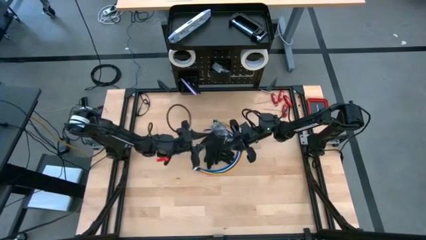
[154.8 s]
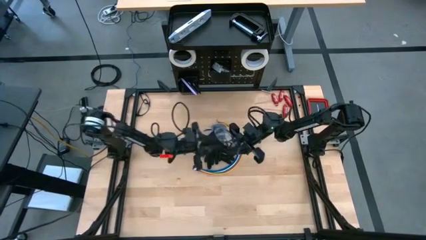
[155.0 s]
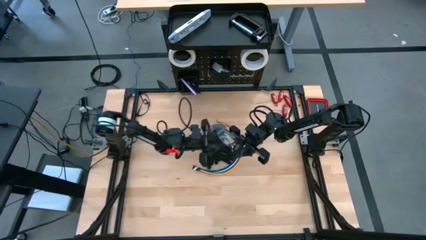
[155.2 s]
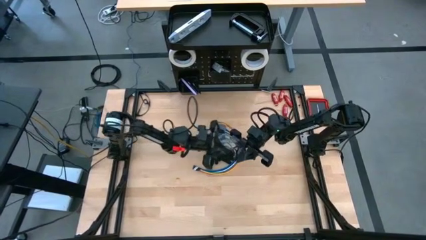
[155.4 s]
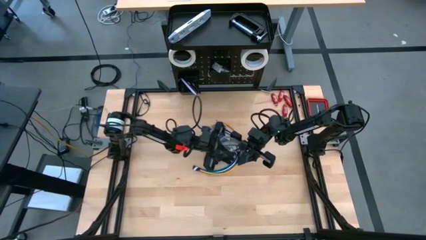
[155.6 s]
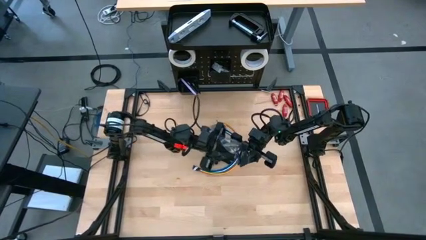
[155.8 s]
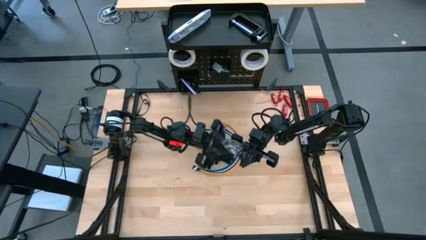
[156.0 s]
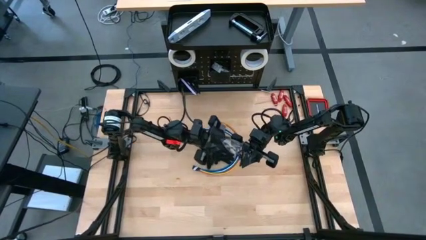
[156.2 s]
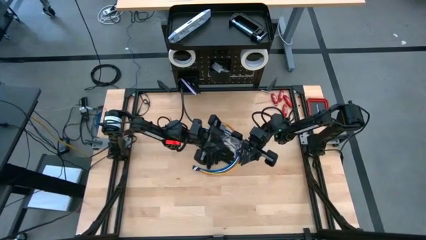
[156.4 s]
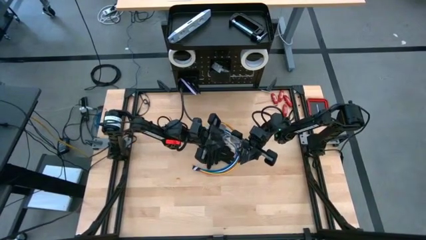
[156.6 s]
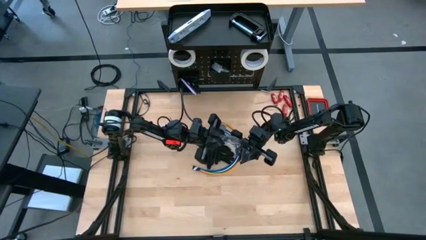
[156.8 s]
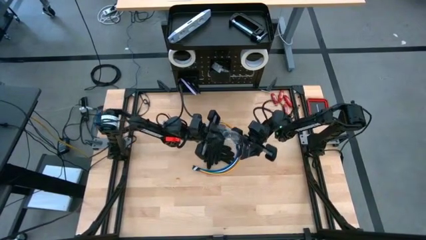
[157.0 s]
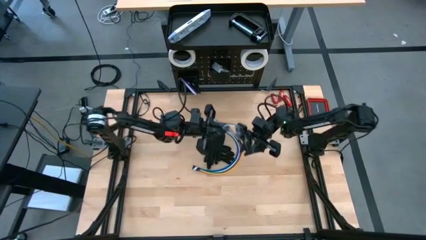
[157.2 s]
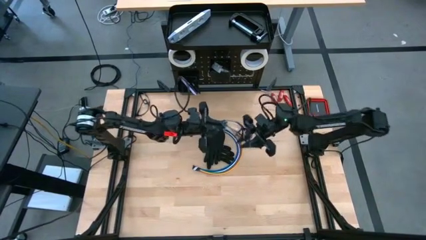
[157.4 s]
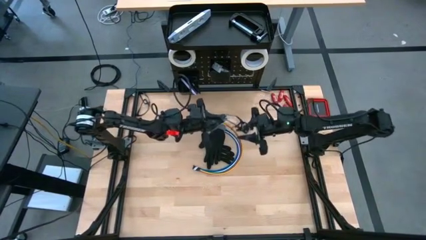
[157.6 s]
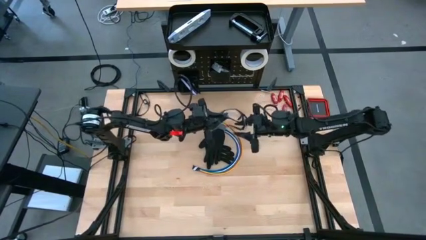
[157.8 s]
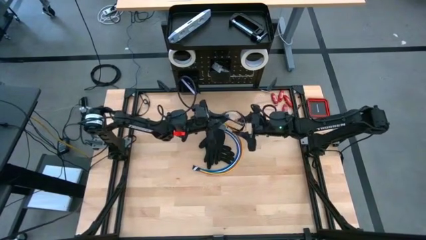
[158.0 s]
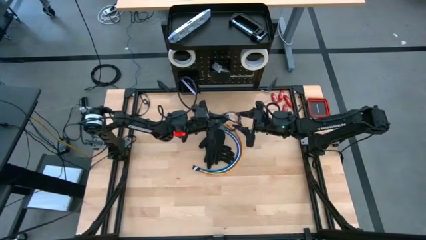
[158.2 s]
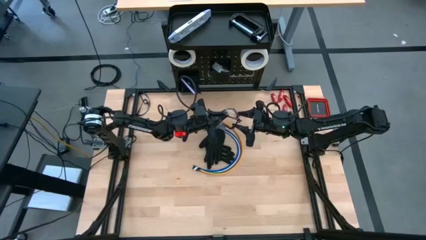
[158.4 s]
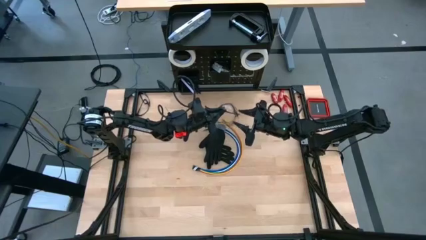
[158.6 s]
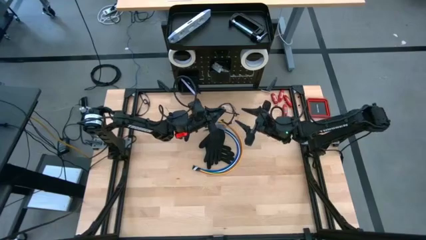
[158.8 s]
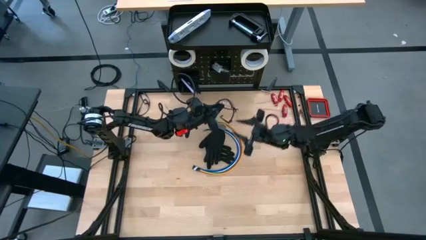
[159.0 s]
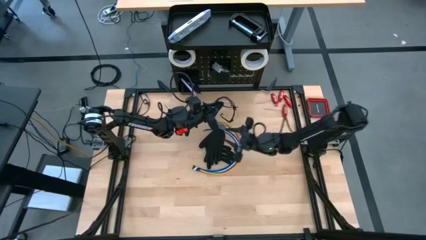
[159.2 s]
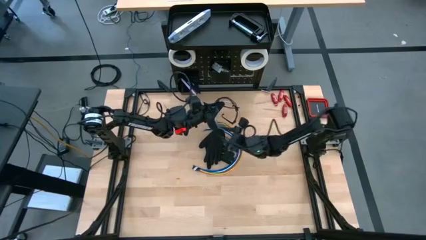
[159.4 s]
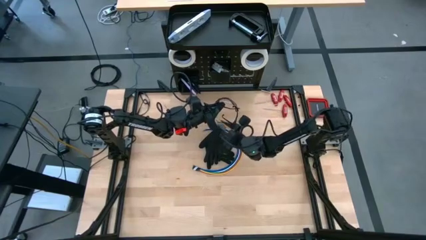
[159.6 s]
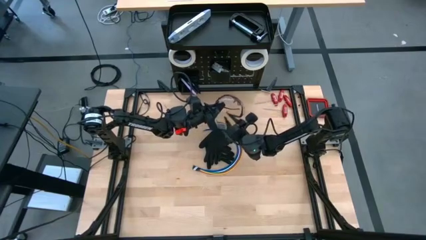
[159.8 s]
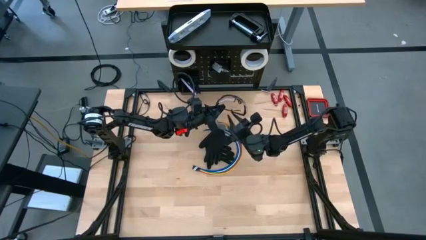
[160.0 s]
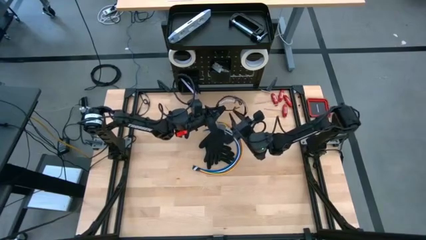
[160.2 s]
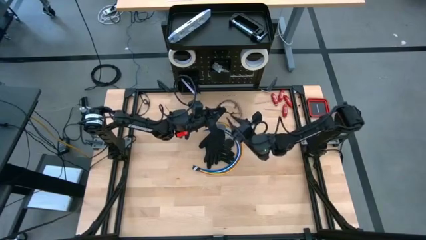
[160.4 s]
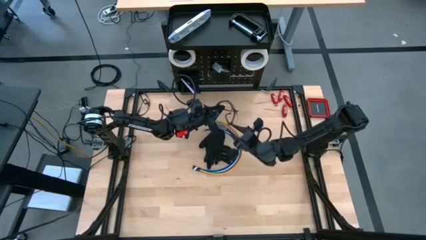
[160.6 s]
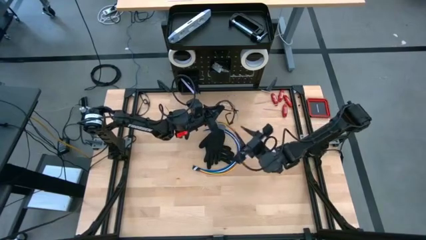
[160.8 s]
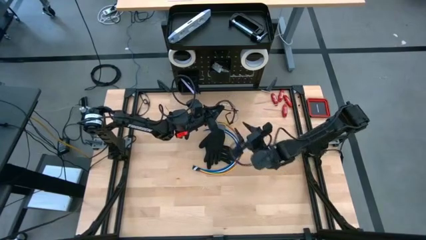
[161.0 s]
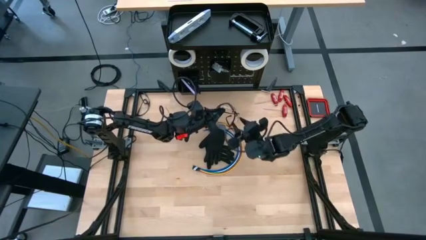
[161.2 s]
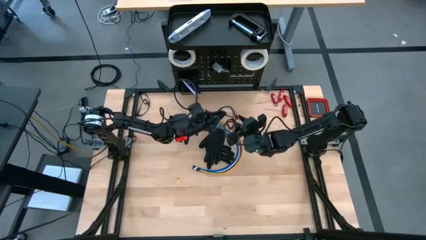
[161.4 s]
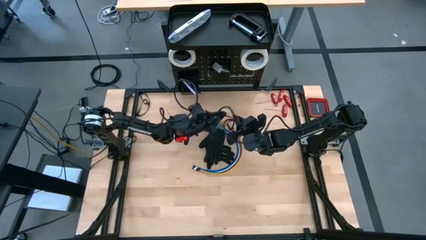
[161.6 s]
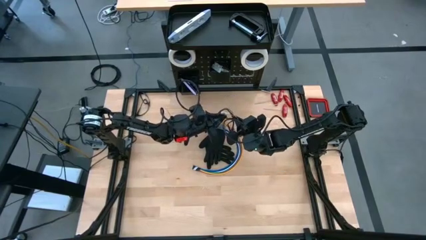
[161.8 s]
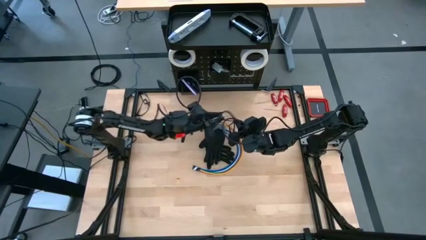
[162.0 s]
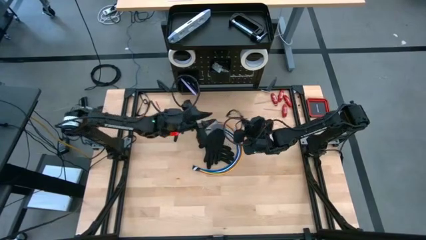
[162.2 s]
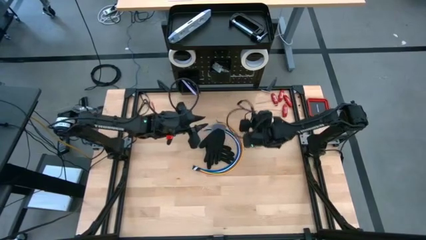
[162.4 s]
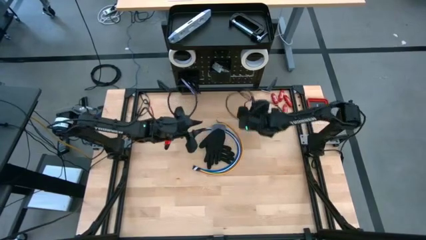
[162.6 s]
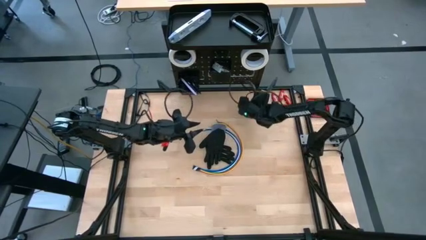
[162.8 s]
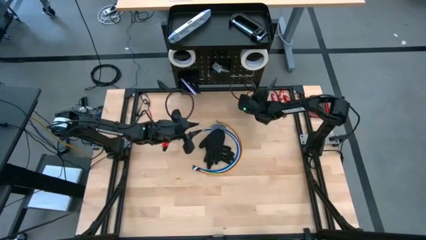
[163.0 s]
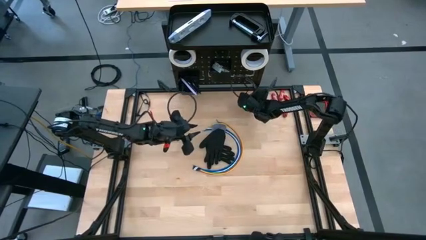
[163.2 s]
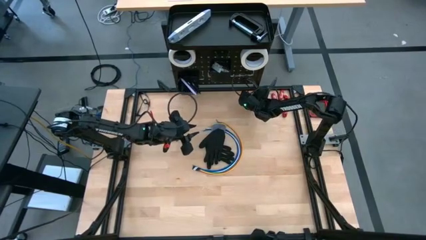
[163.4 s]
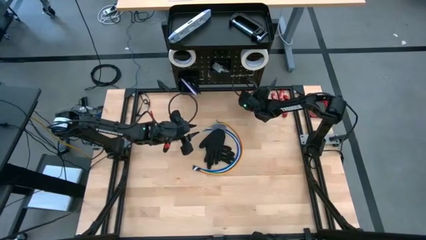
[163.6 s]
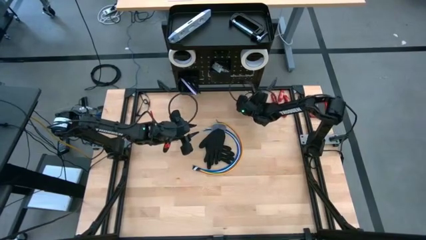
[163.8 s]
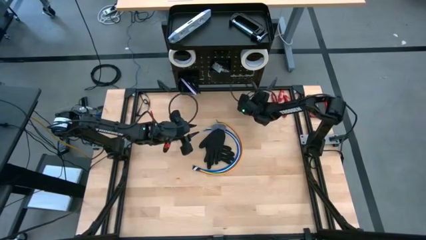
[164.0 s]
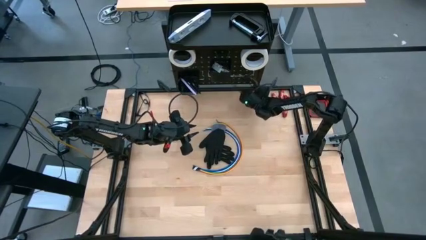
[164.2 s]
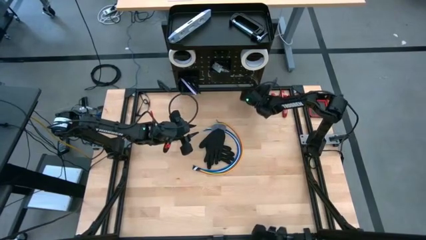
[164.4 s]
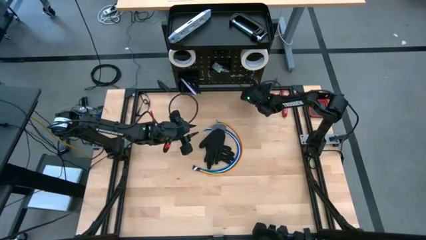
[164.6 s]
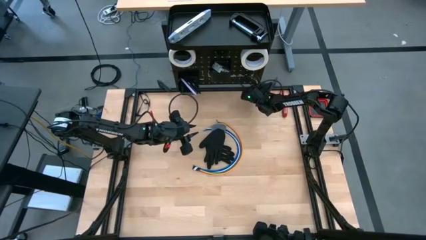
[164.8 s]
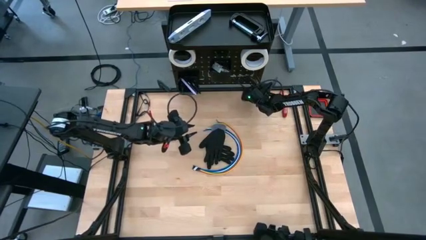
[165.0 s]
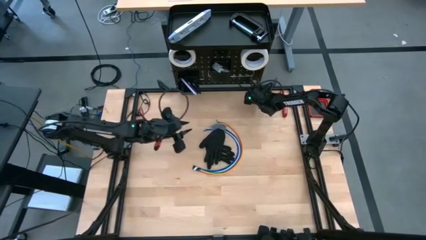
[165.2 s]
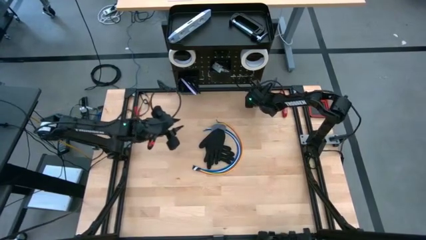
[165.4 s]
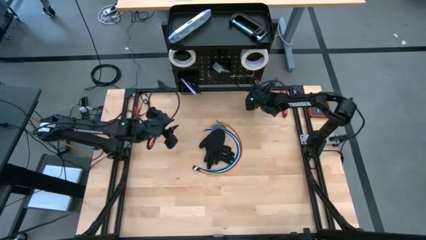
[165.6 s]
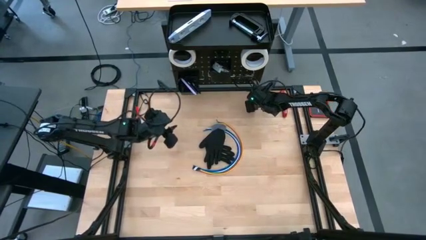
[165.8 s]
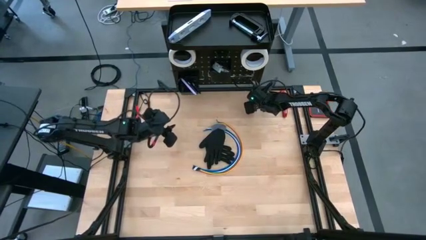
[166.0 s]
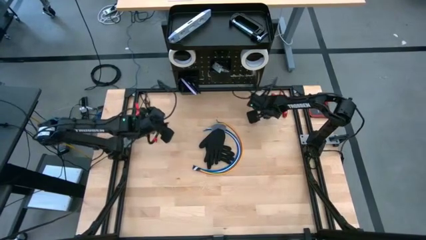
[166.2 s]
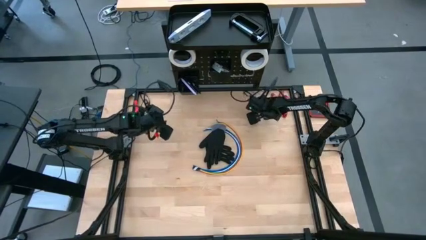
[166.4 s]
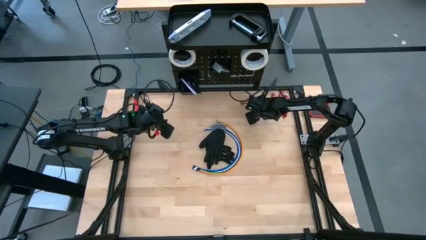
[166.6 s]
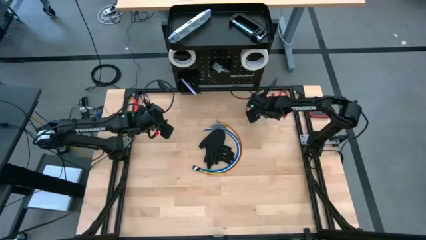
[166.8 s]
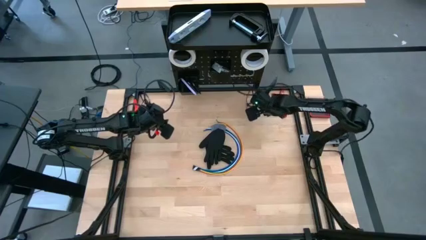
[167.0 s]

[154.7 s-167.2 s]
Task: Hang tools onto peg board
Hang the safety goggle on the peg board

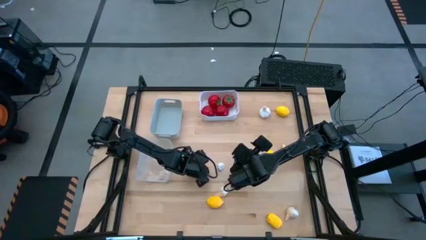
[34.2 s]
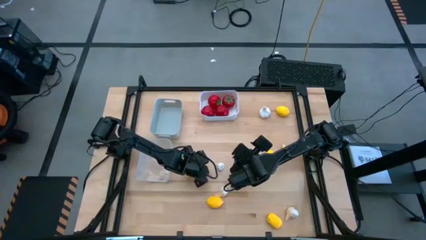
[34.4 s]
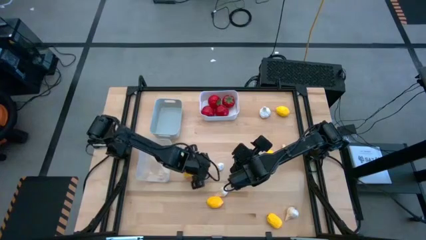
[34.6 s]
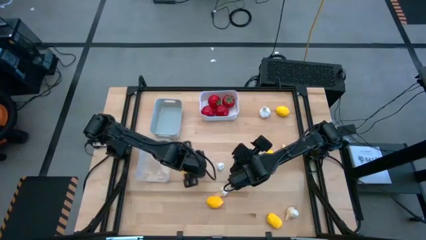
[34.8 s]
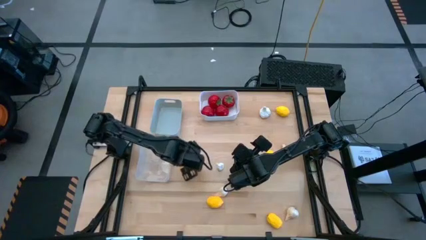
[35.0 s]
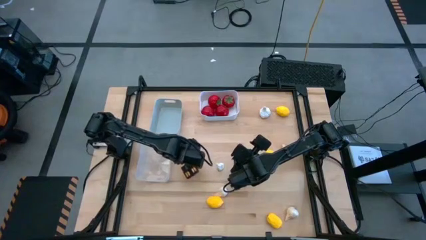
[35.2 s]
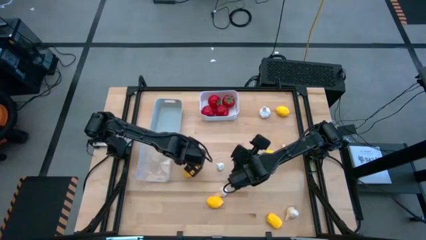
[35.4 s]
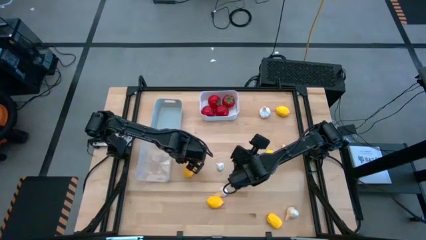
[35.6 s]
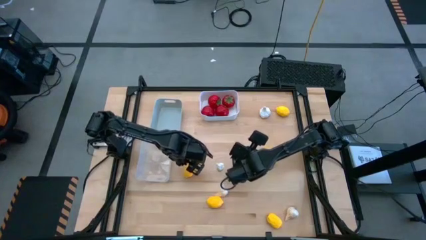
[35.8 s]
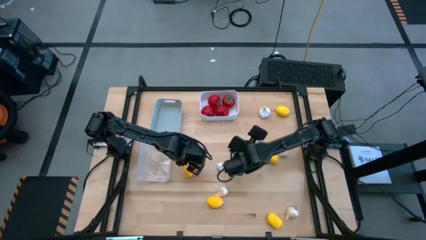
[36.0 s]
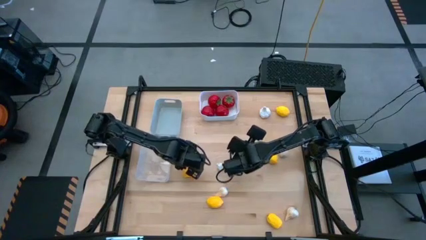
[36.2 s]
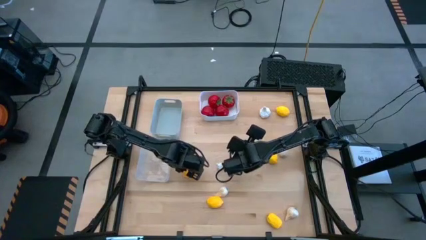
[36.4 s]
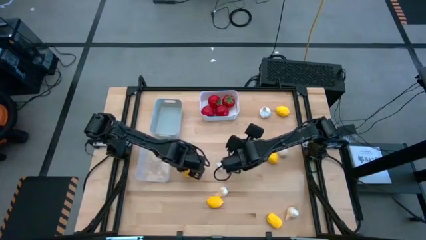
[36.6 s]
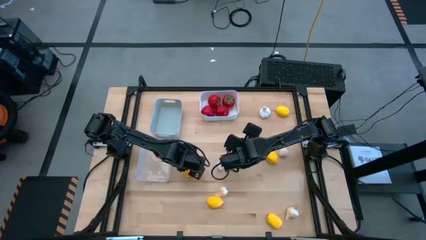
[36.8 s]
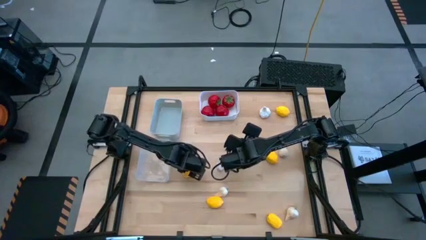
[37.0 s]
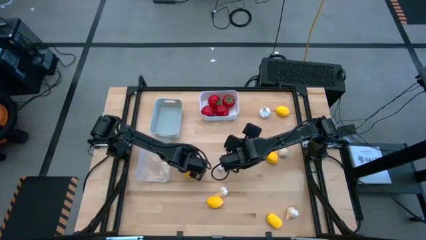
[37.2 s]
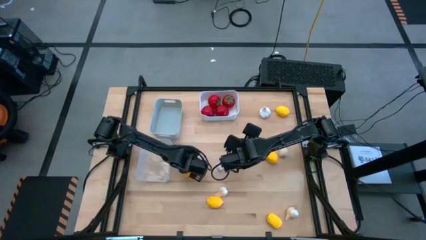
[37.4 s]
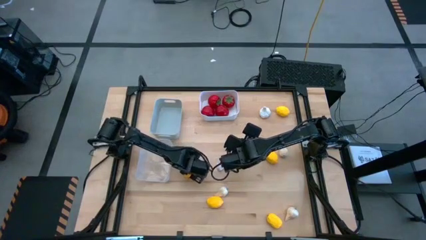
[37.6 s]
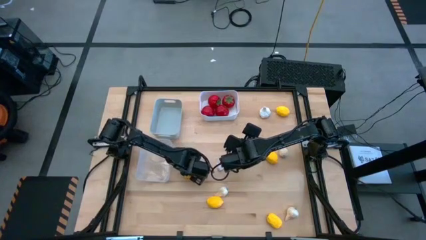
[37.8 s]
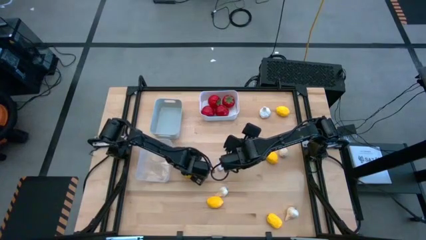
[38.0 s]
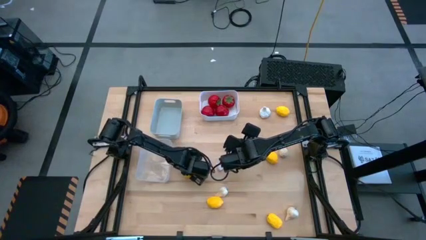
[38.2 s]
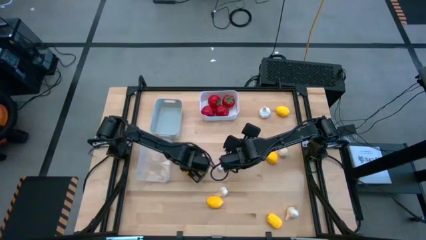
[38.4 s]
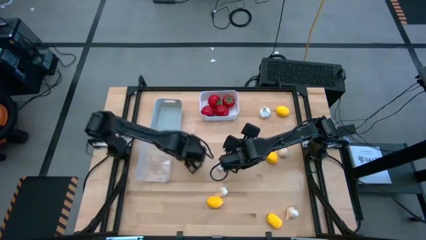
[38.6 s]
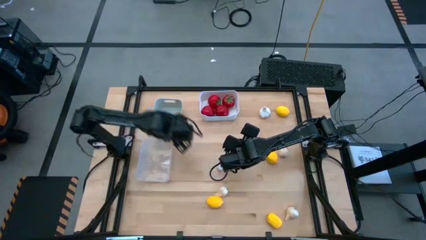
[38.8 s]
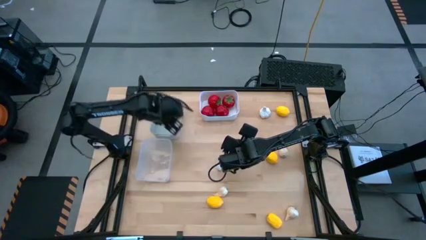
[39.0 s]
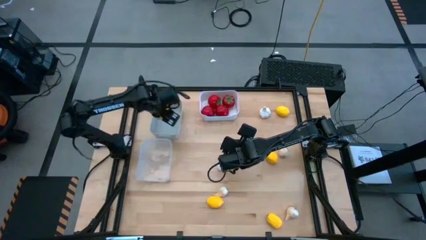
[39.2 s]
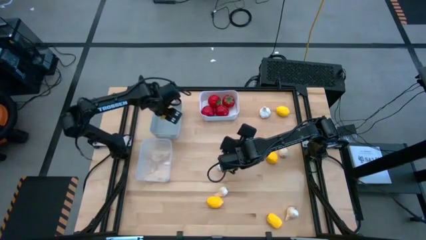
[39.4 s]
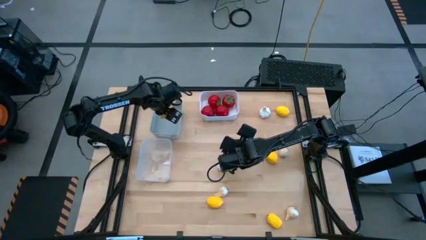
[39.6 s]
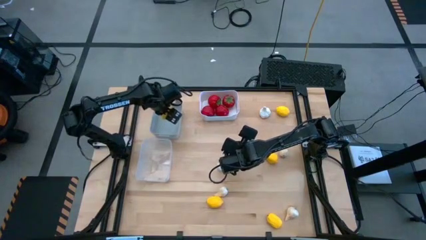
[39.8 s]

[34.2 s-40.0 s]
Task: Sort produce into baskets
Put the yellow lemon into the gray bin
